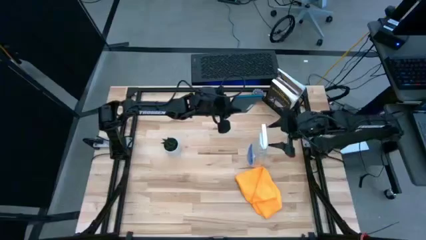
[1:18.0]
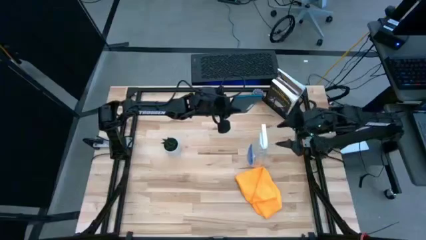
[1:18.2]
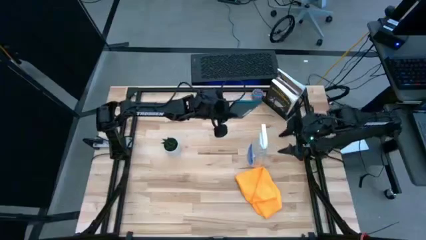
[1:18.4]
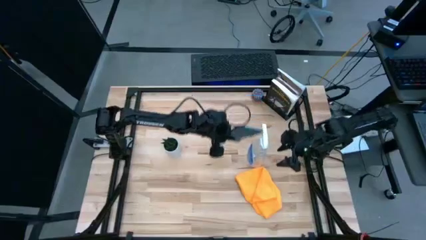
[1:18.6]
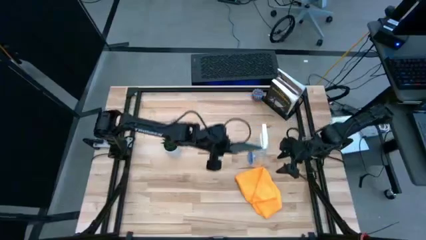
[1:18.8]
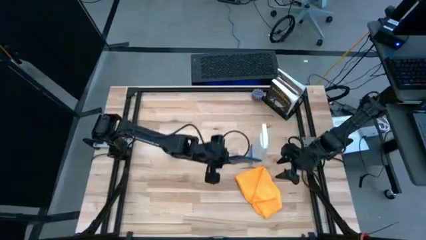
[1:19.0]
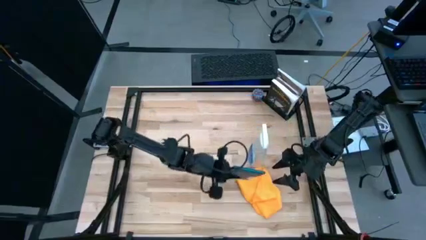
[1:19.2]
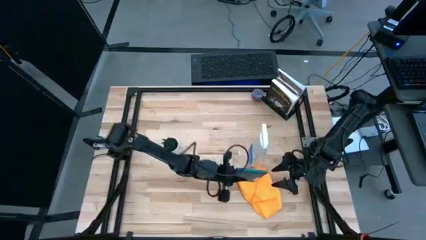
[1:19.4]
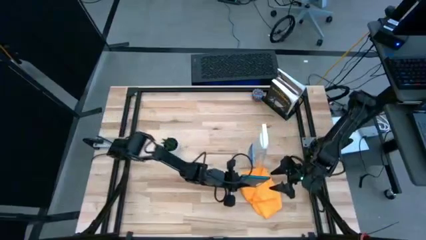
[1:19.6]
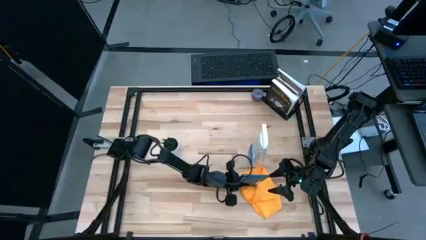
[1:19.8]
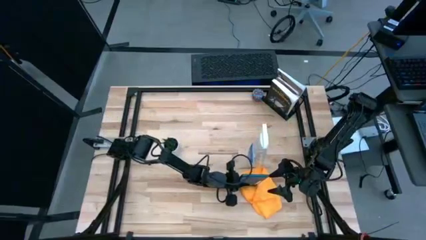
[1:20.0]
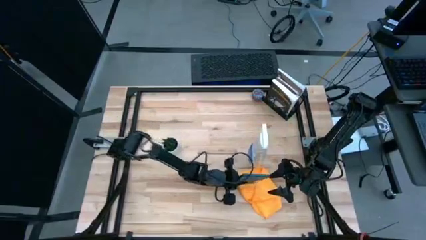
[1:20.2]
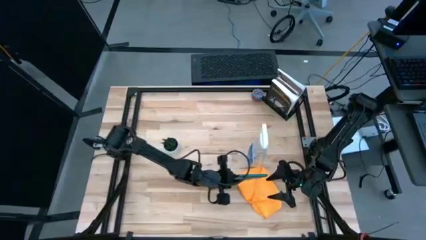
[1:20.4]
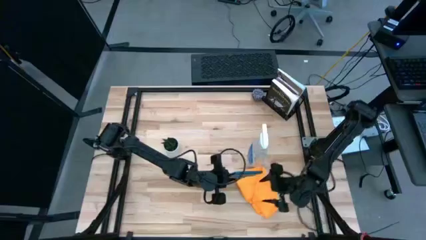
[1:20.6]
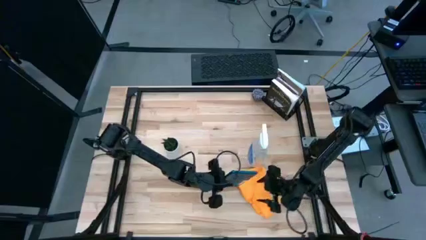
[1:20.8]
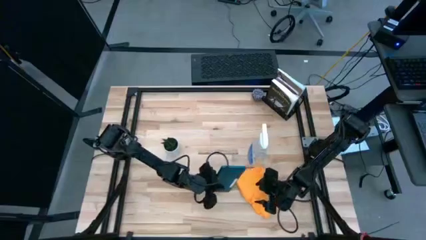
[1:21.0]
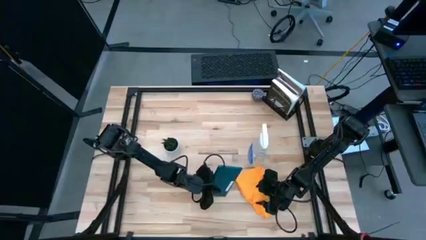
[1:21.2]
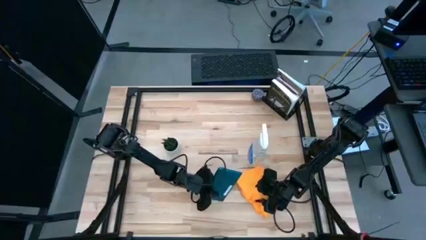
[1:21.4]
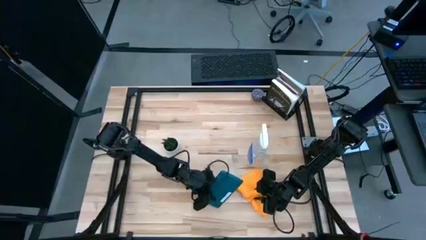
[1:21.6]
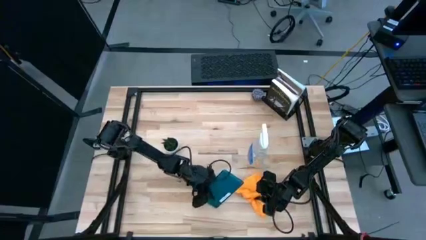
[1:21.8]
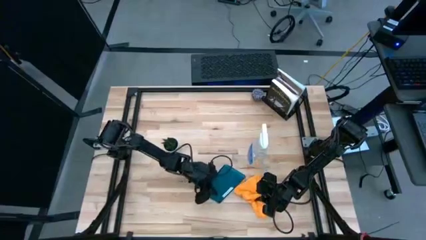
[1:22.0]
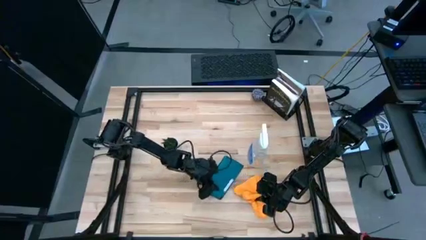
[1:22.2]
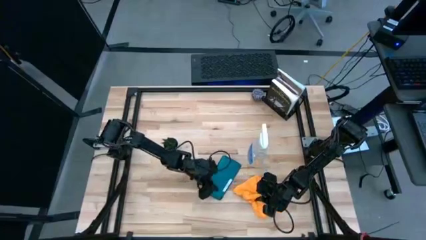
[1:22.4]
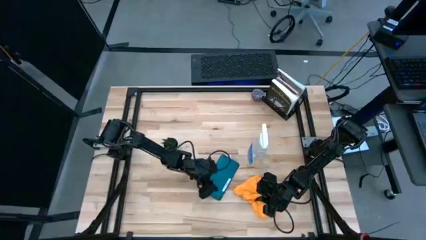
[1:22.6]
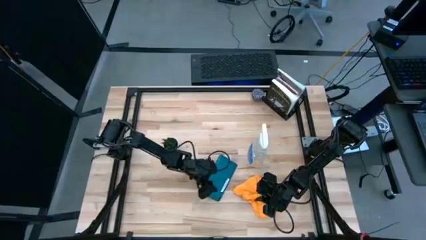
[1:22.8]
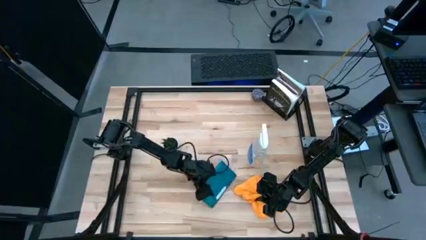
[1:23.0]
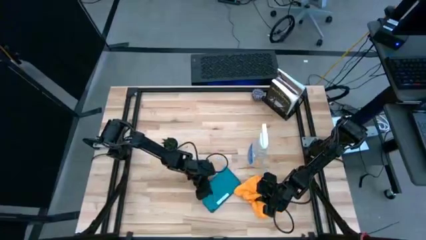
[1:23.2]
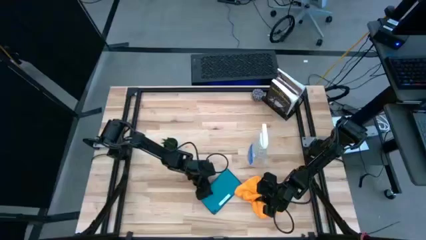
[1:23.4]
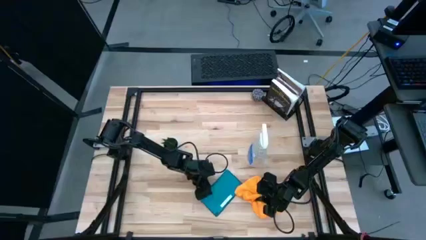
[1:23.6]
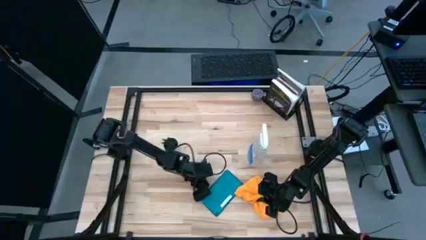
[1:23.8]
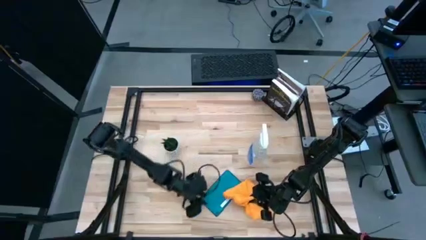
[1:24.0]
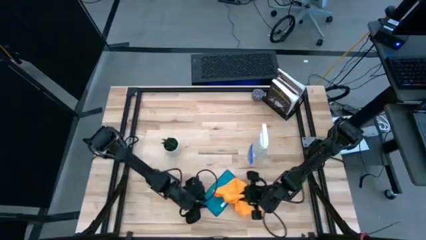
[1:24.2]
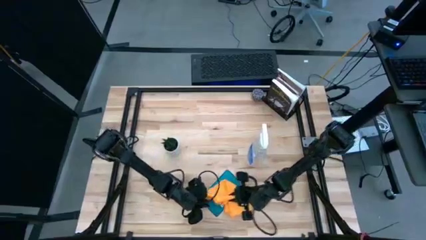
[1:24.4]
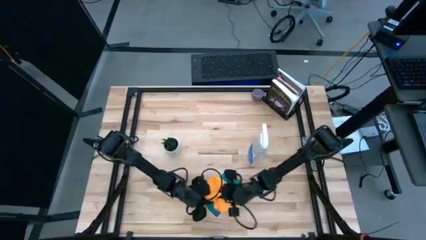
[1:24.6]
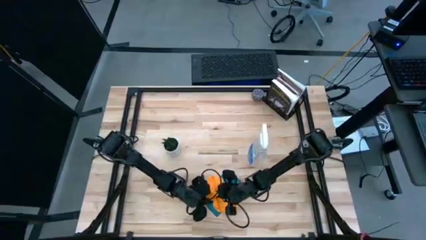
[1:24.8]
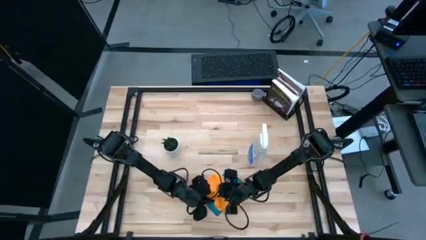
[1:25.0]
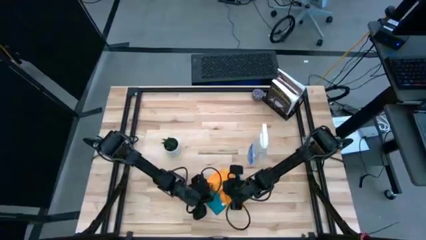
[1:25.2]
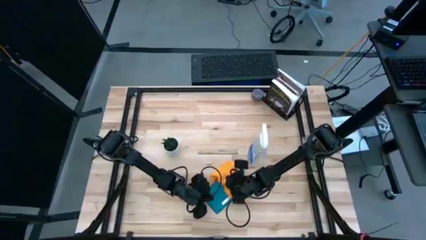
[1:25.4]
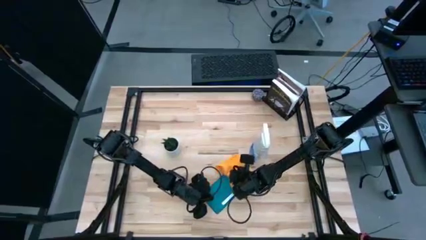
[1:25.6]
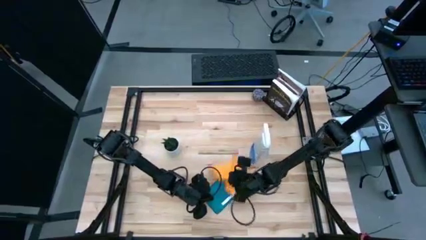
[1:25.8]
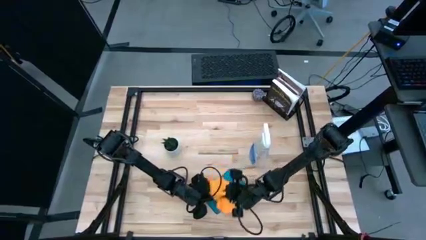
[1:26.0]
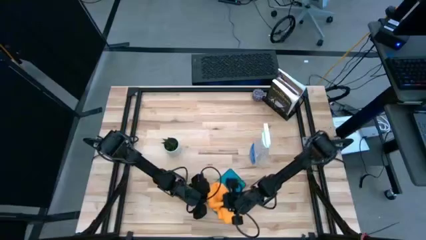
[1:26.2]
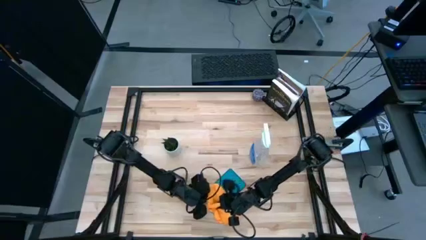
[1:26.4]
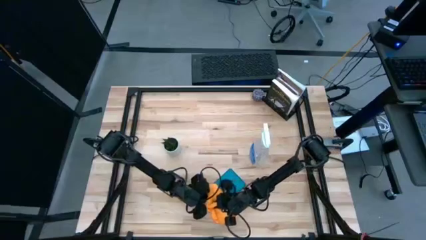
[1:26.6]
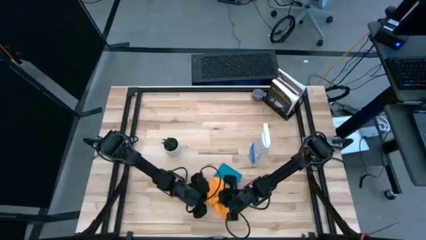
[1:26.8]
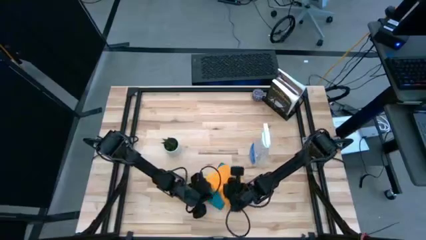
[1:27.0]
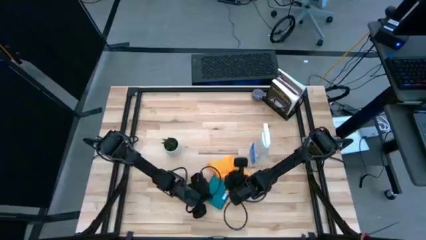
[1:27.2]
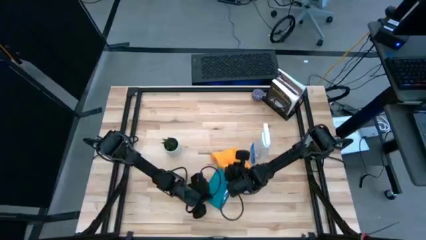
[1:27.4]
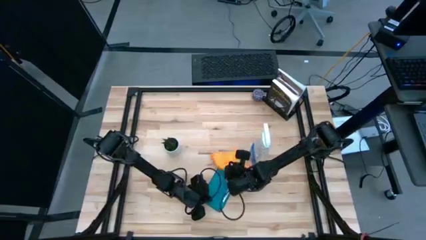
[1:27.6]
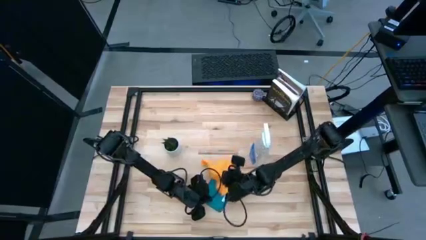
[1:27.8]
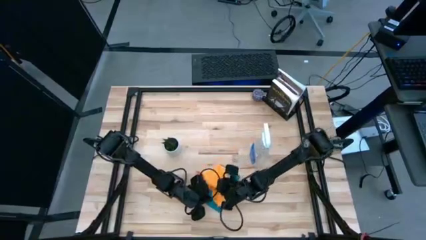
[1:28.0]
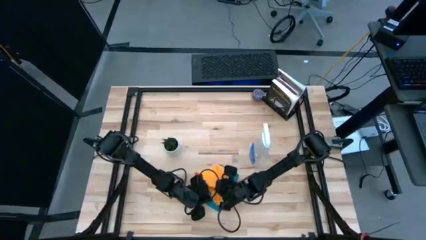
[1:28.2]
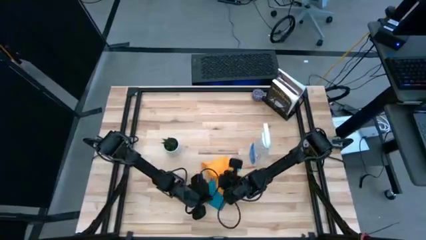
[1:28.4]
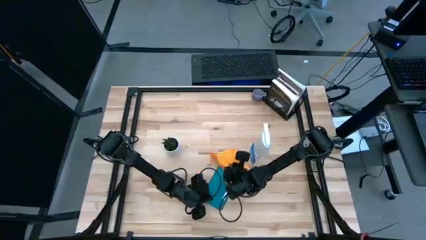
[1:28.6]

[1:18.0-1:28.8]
Task: Apply microfiber cloth
Wipe the tablet with the microfiber cloth

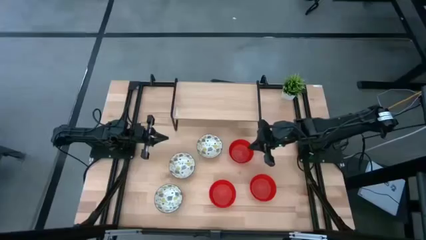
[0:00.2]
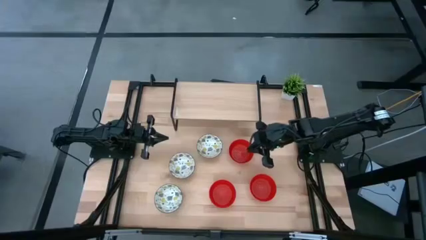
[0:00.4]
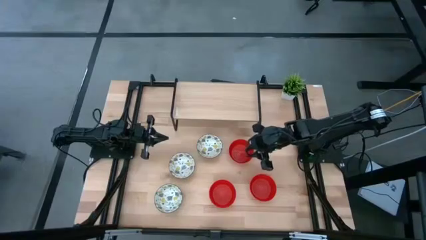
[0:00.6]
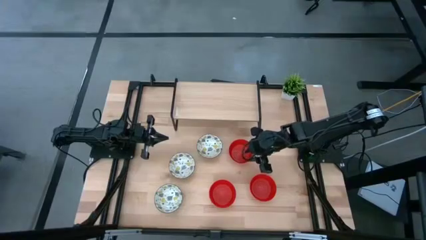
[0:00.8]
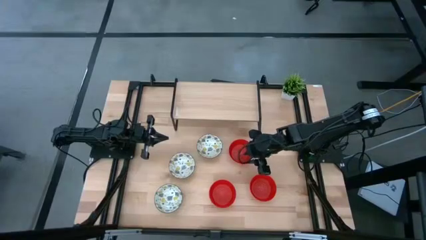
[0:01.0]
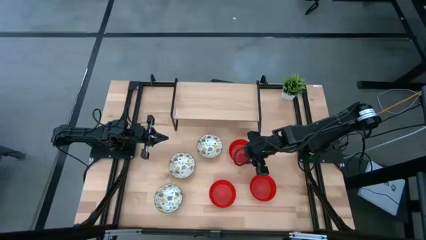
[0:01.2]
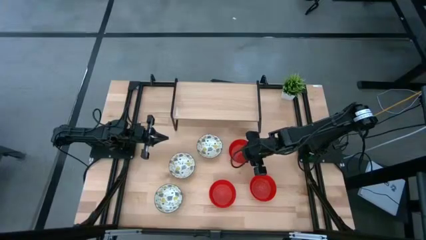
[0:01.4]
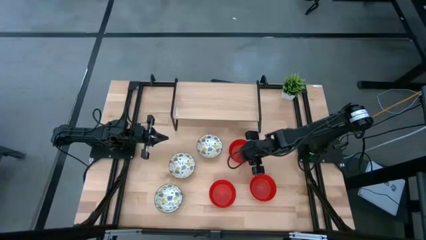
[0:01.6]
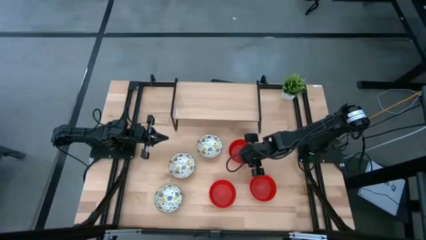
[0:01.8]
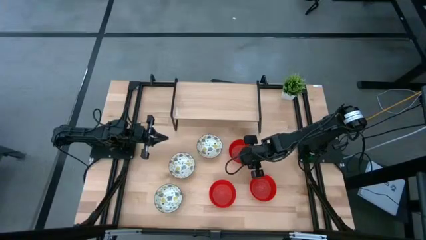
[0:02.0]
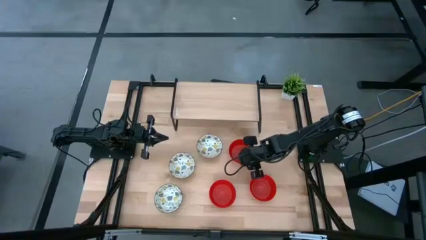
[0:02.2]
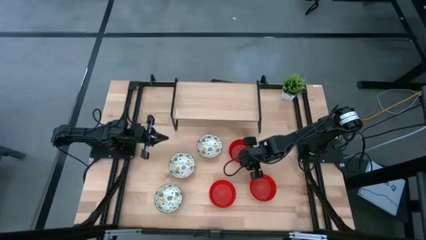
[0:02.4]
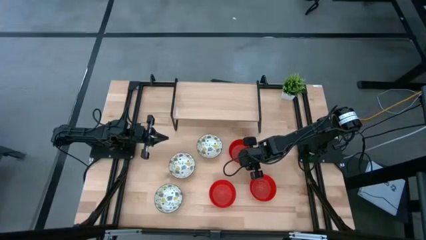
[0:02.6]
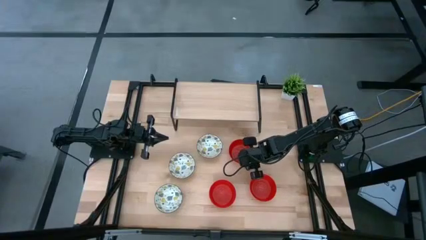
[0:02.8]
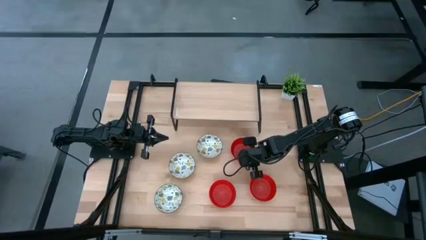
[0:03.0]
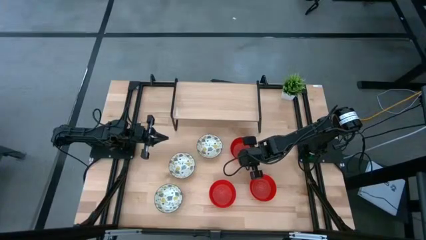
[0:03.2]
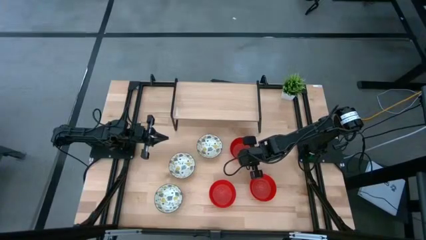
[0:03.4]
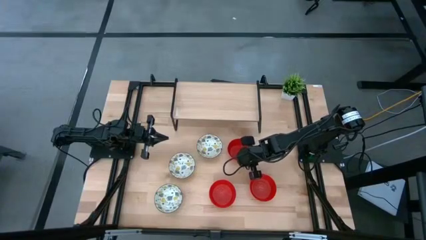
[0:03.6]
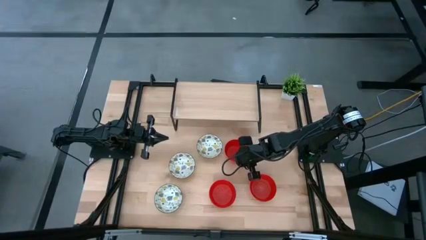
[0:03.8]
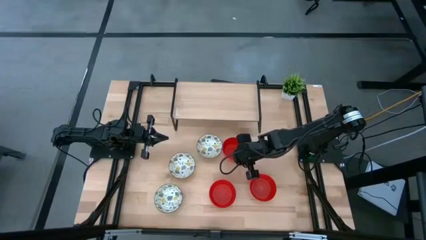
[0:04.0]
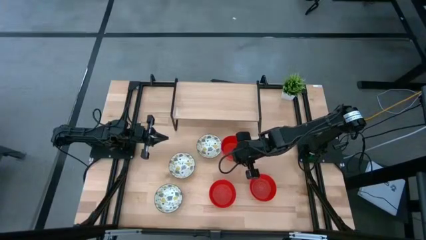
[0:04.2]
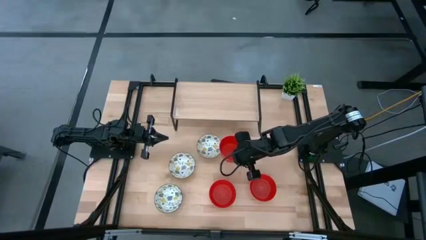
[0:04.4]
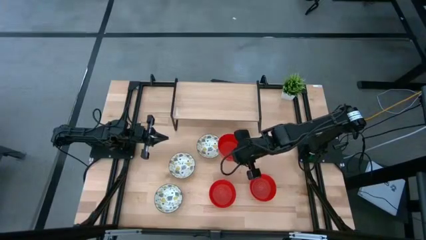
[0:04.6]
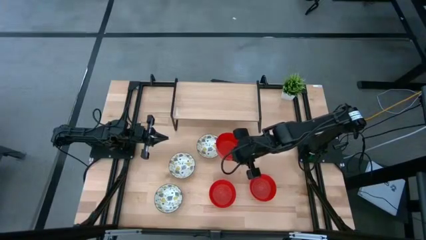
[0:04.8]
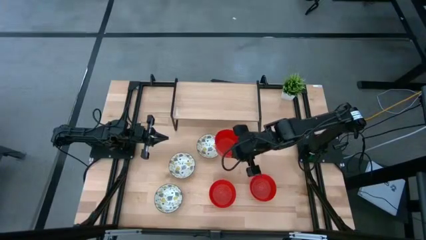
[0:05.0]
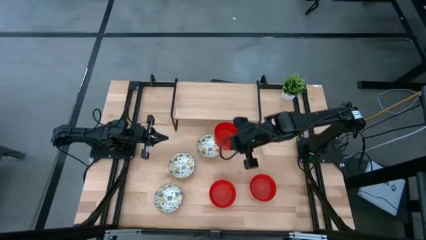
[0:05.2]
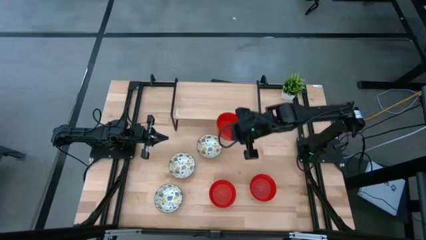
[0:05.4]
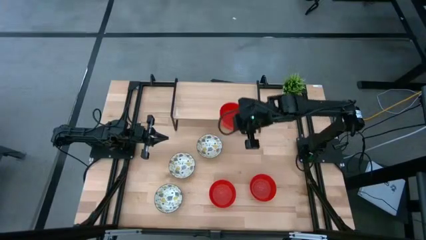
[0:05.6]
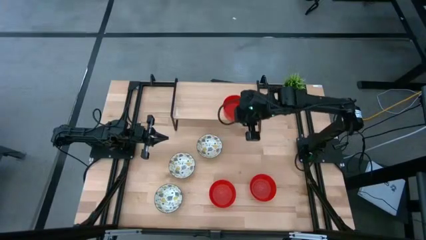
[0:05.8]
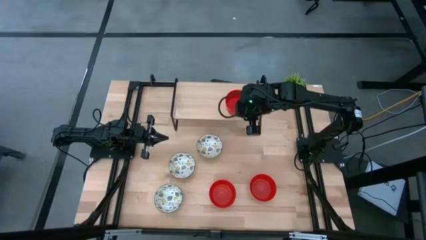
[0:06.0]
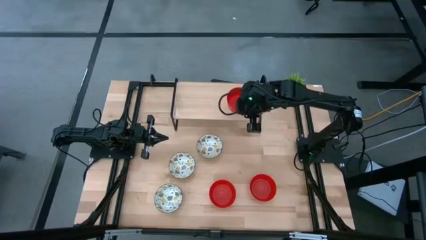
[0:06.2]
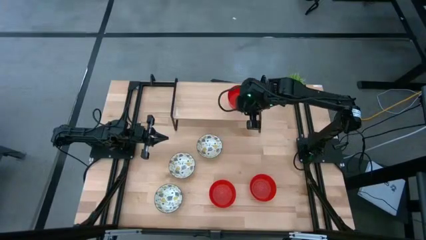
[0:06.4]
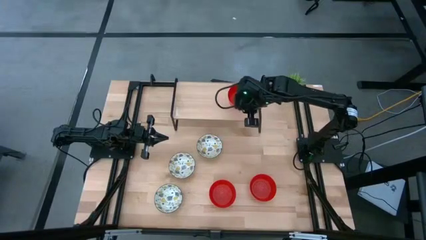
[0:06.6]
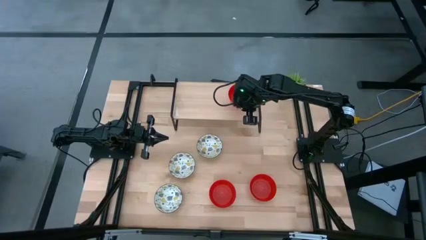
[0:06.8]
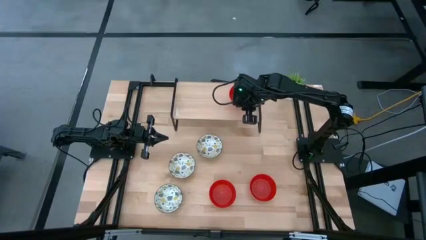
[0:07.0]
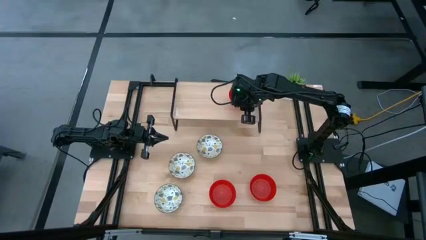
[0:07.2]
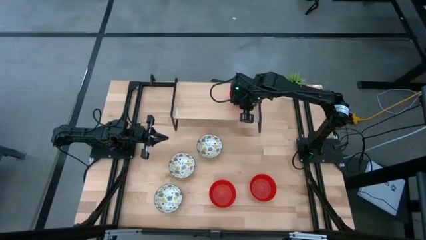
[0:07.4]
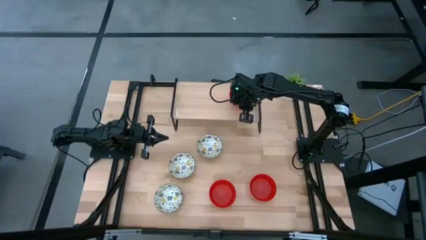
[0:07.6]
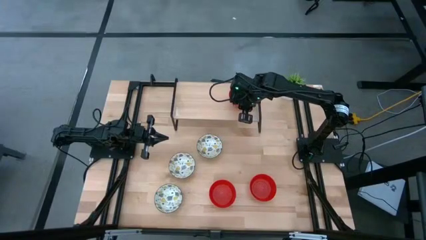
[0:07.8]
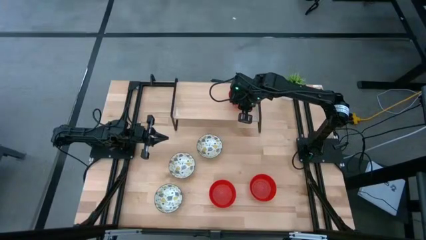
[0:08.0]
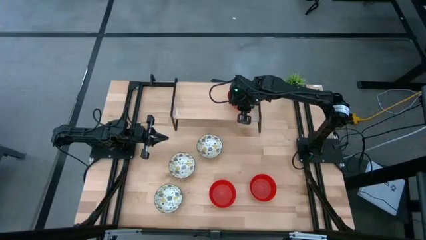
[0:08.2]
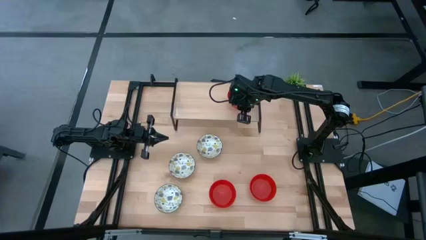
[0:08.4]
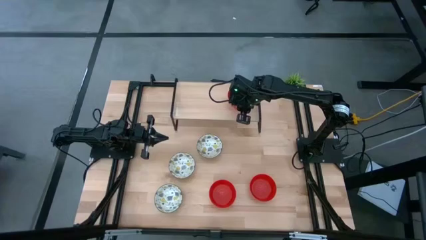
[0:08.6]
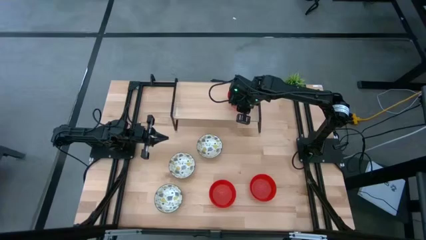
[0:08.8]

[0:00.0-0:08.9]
Task: Pick & Place Mini bowls
Put the top red bowl on the shelf
